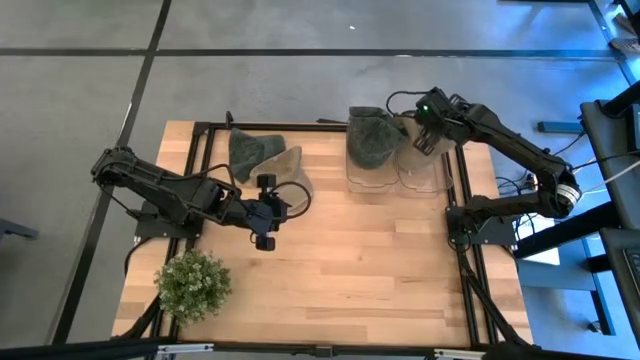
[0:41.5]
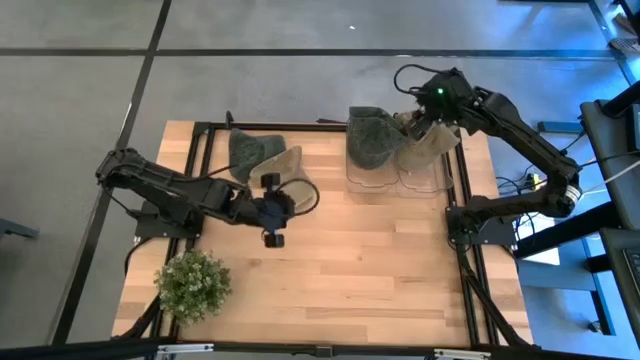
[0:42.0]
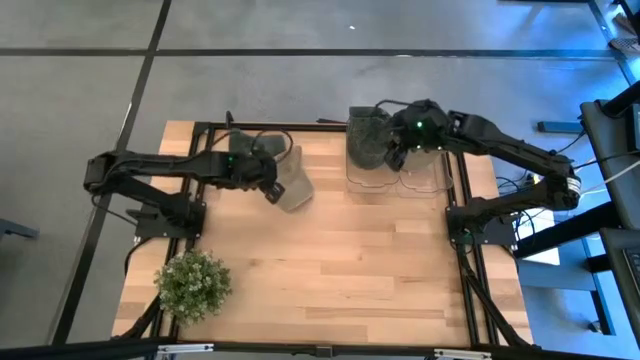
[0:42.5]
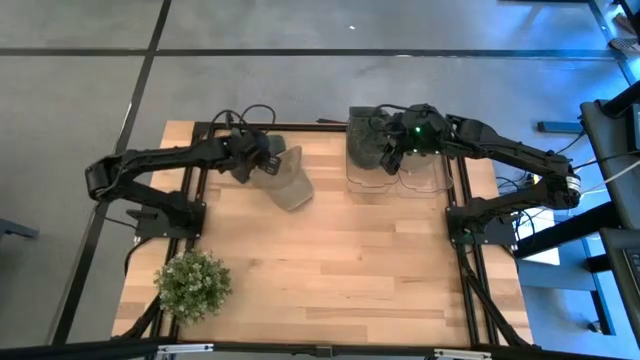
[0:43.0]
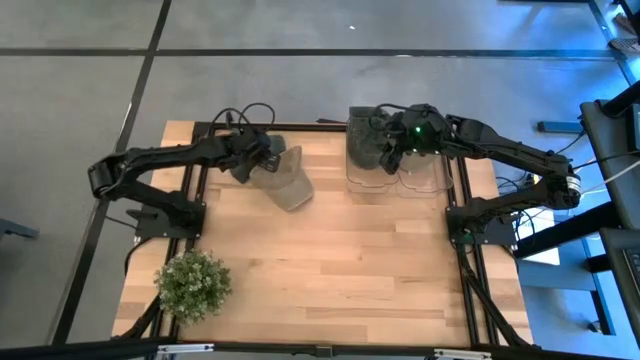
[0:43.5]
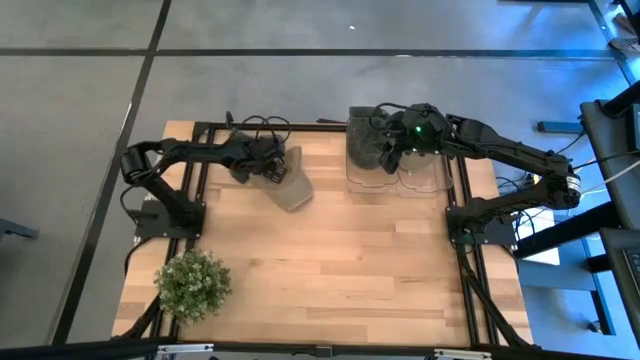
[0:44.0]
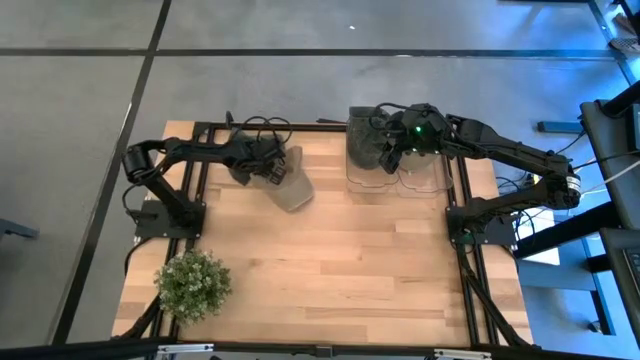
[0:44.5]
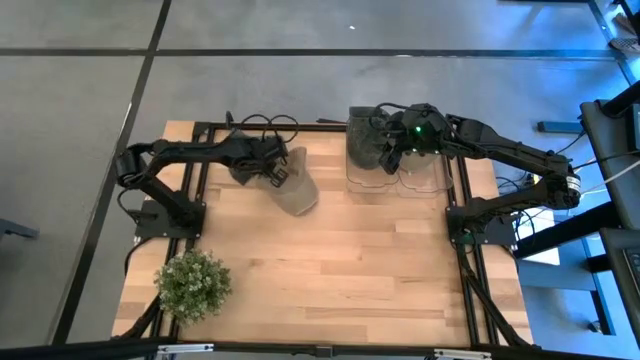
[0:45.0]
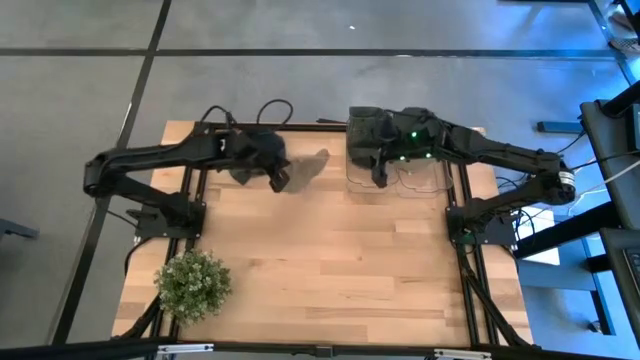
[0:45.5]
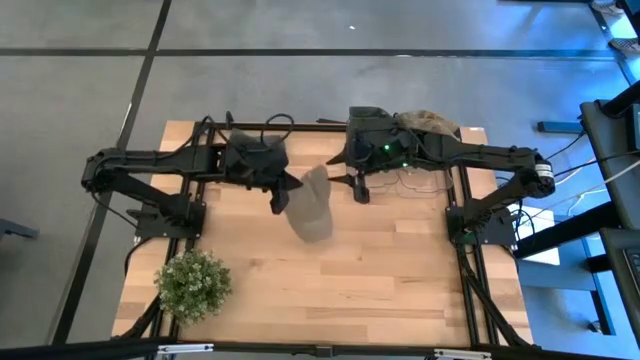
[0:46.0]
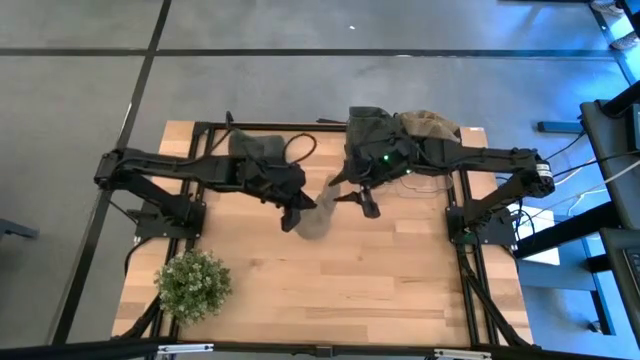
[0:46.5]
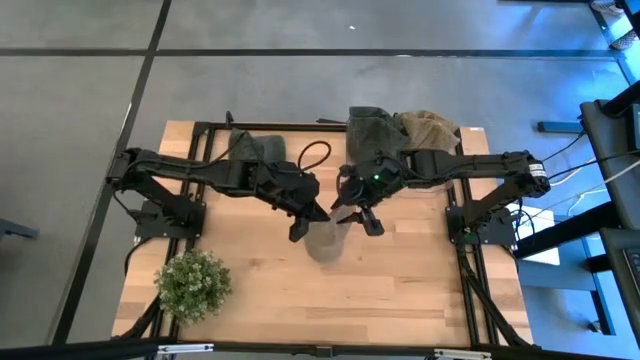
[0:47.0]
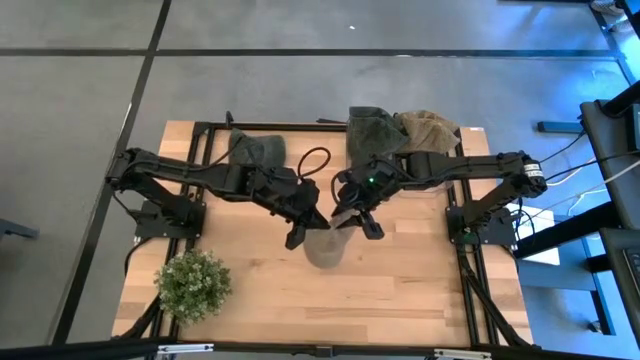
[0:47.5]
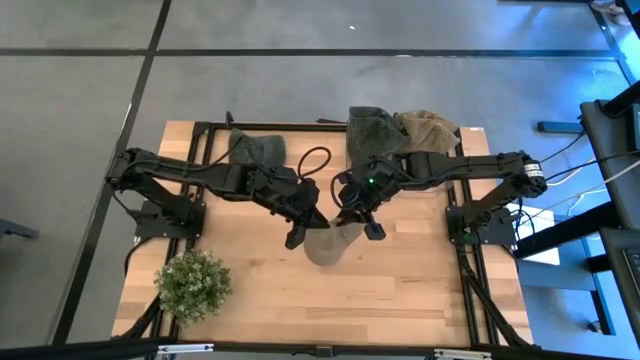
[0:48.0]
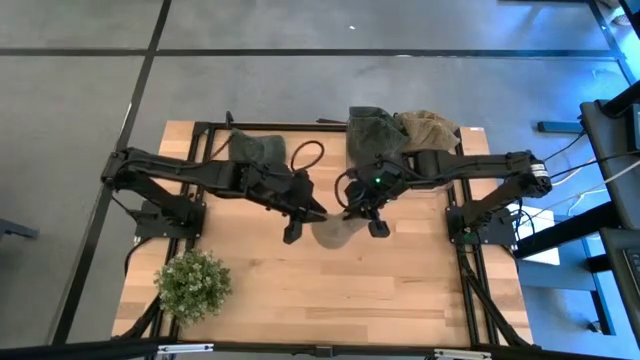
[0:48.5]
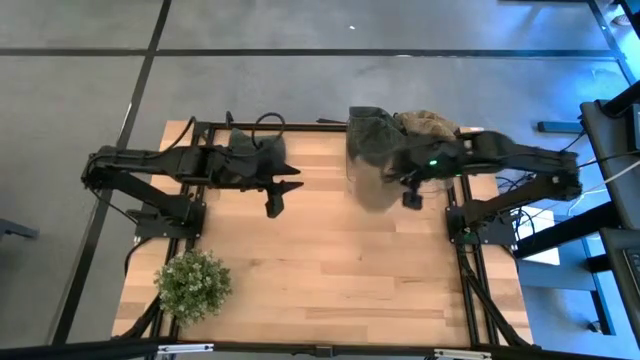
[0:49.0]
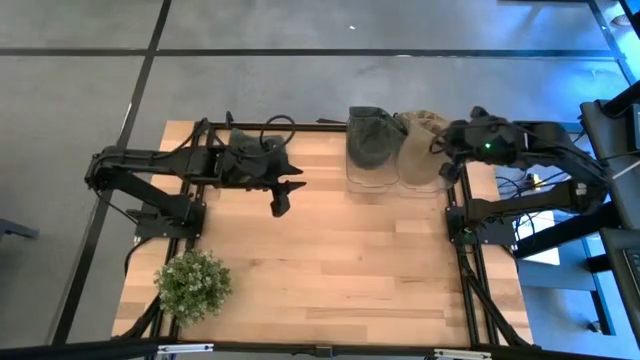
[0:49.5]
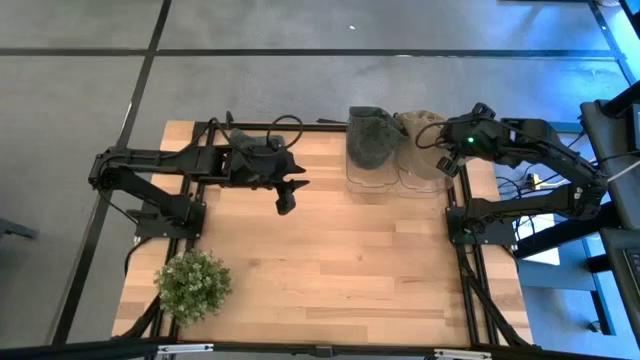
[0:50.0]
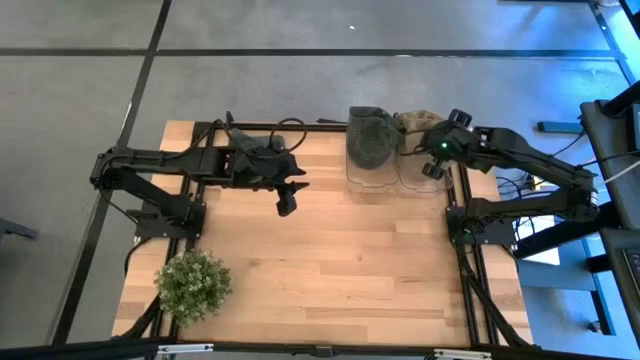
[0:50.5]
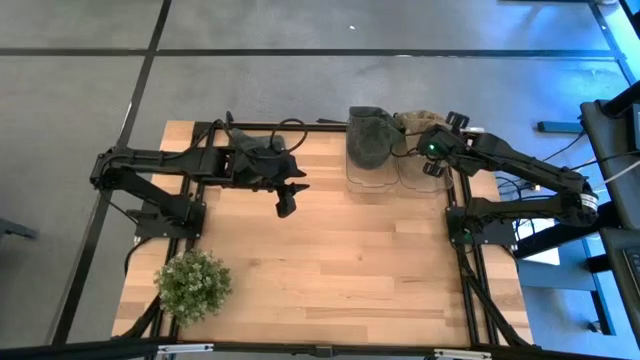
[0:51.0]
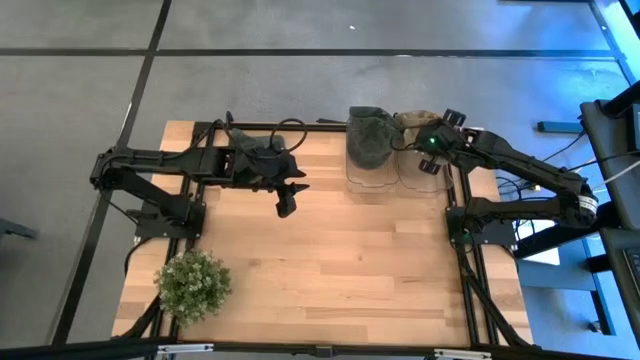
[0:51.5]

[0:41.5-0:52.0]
Task: Pick & Place hat
Put the brown cap into the right transparent bin

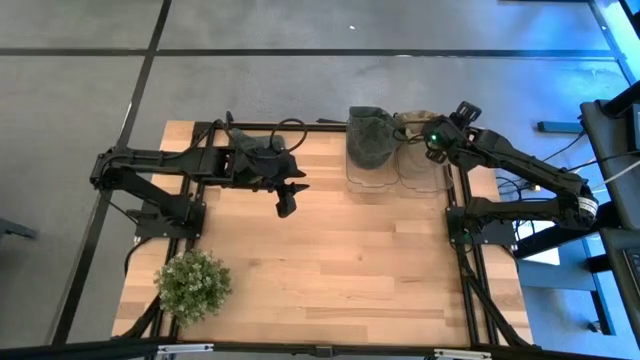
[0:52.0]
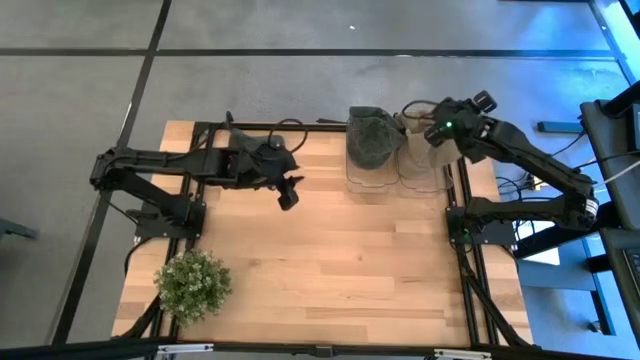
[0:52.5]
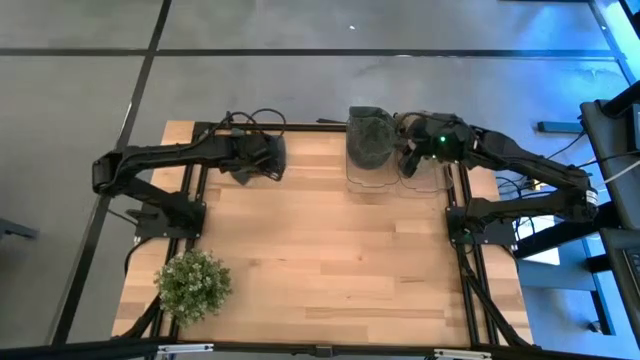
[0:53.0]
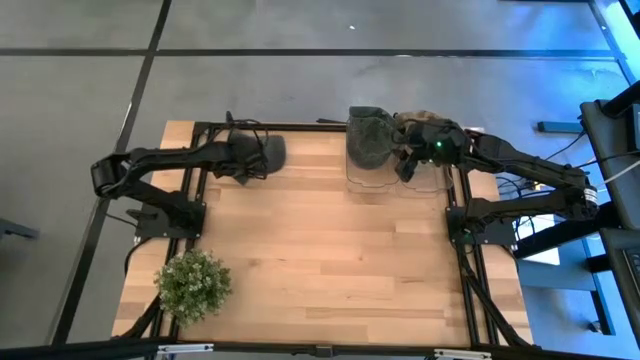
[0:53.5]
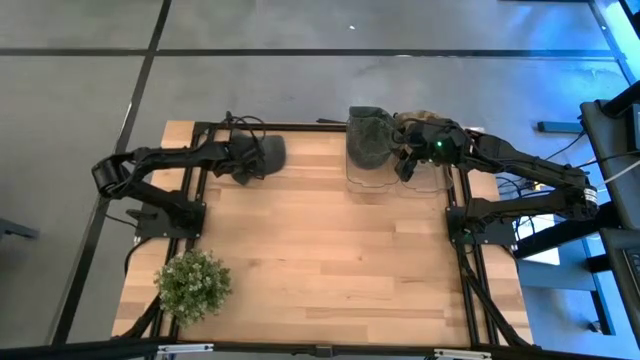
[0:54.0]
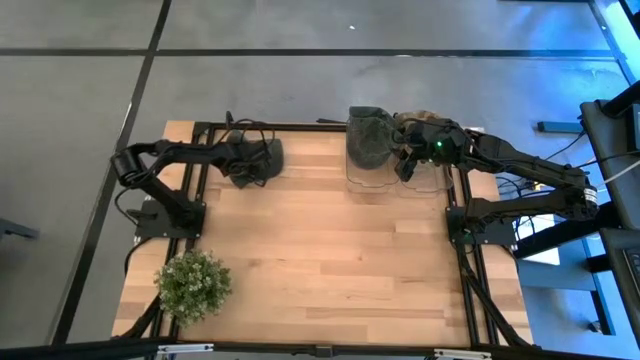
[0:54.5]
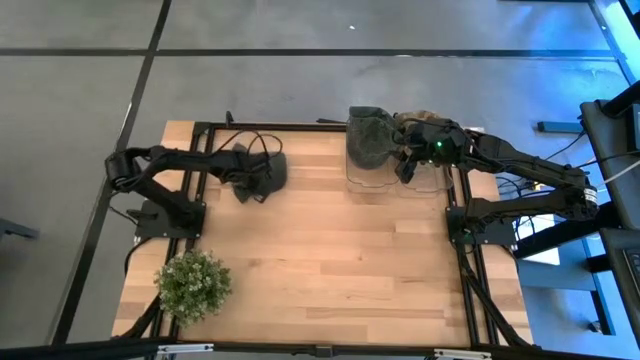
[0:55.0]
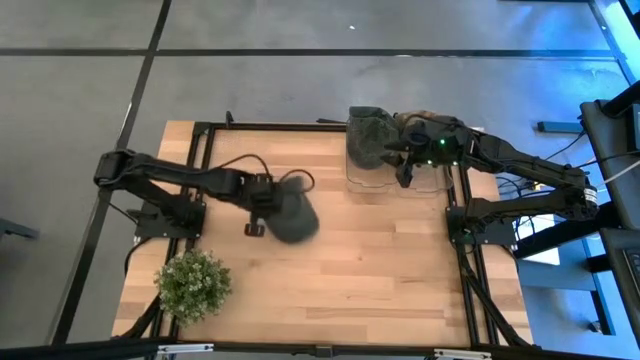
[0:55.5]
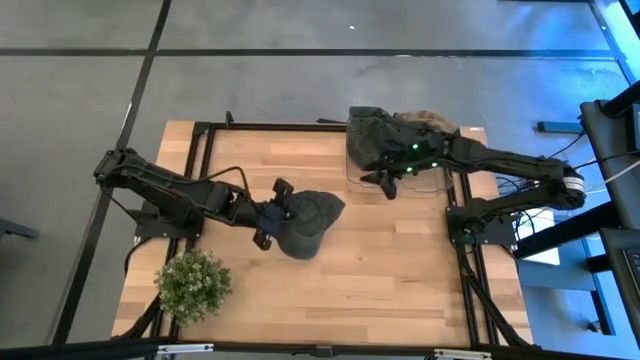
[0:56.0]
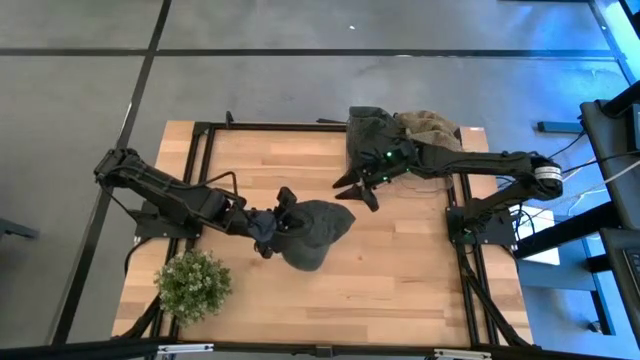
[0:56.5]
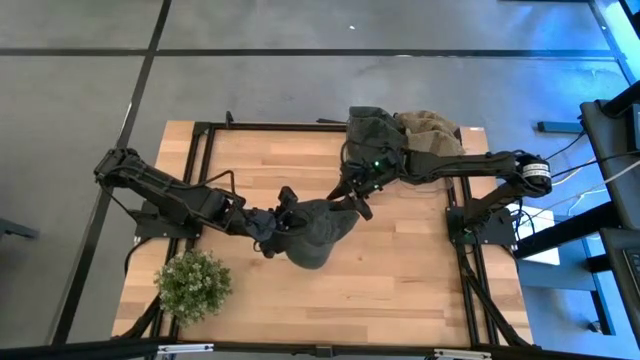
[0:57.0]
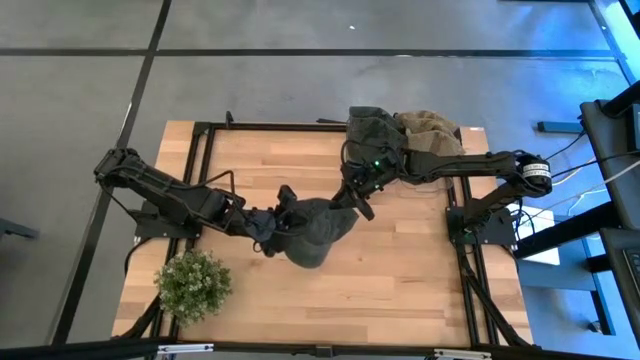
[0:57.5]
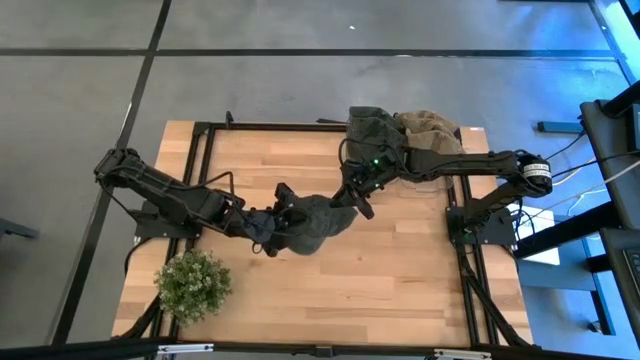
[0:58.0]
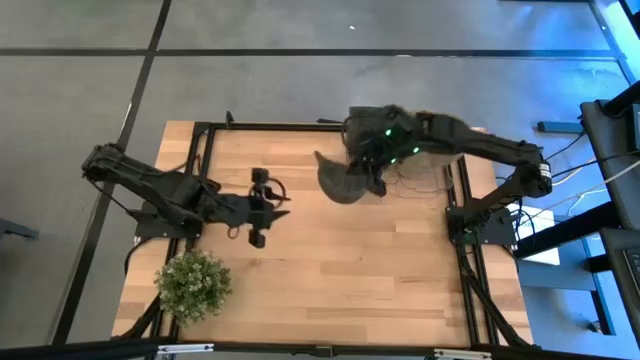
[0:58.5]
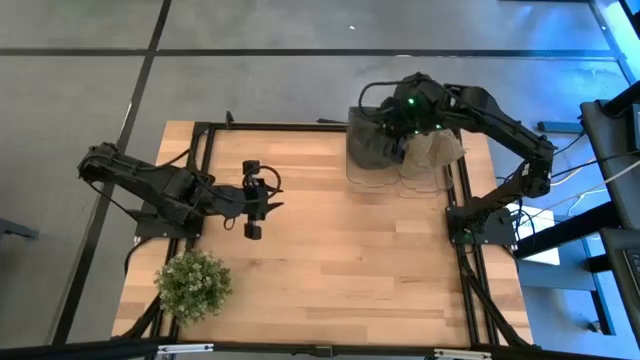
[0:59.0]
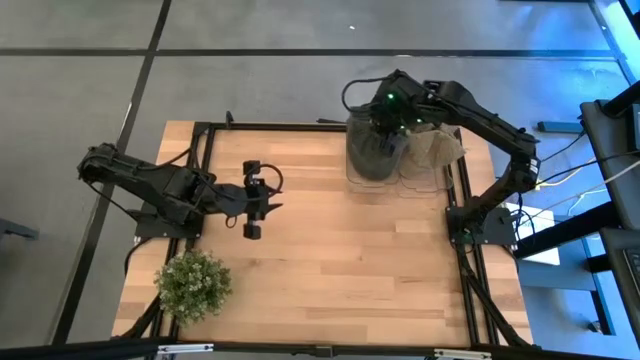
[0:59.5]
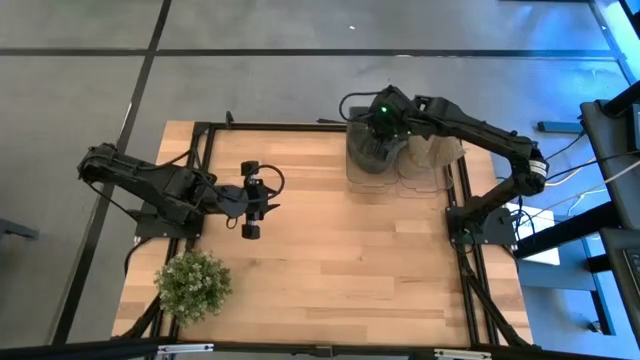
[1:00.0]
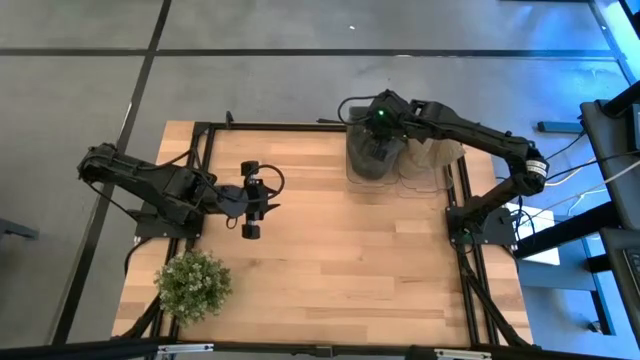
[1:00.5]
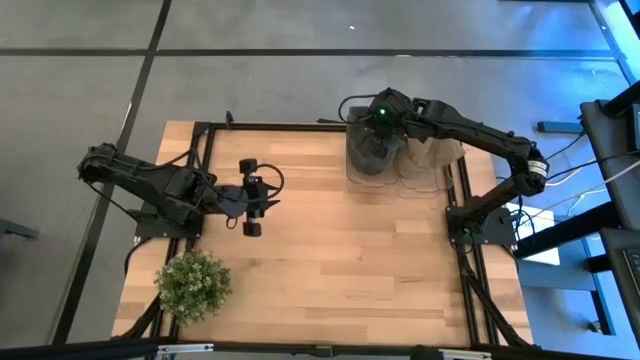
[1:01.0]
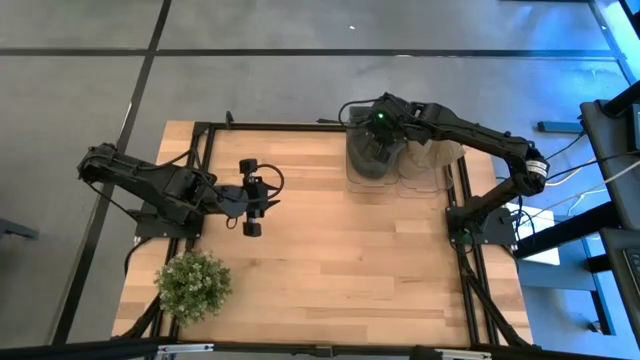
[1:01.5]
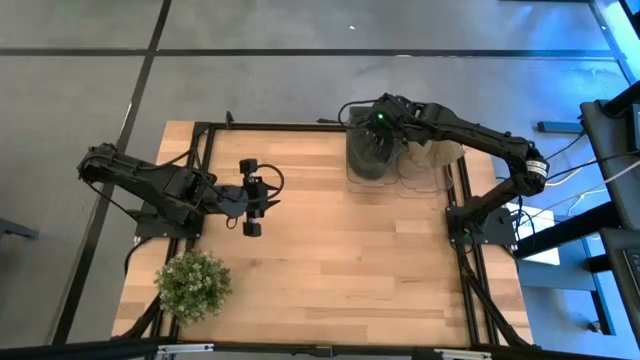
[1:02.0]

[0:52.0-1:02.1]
Put the black cap into the left transparent bin

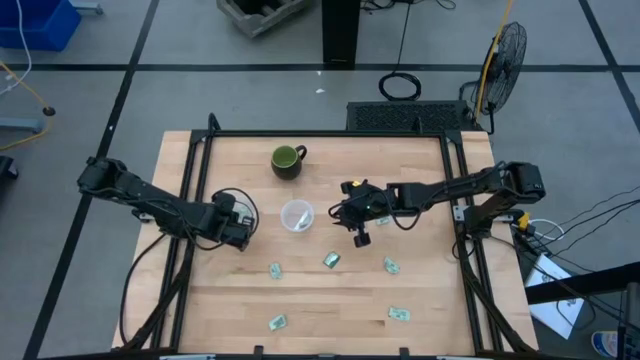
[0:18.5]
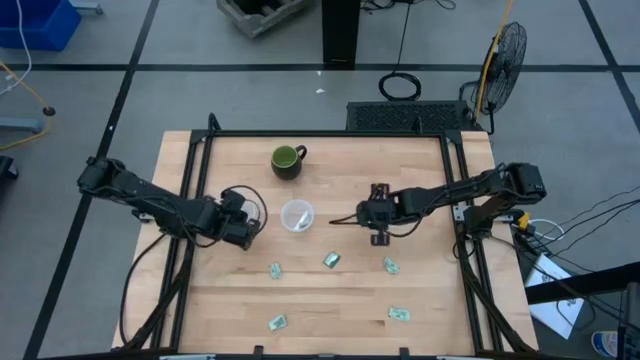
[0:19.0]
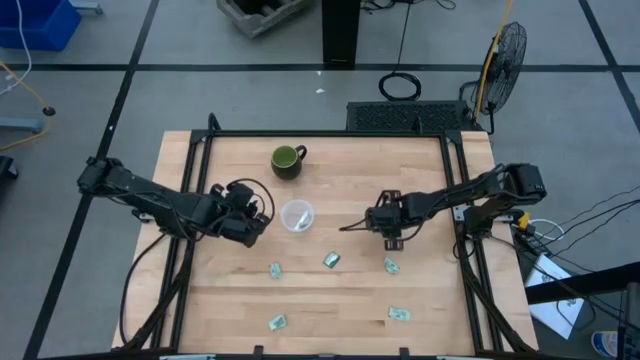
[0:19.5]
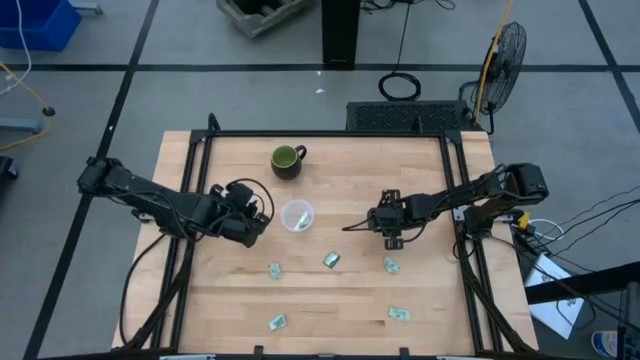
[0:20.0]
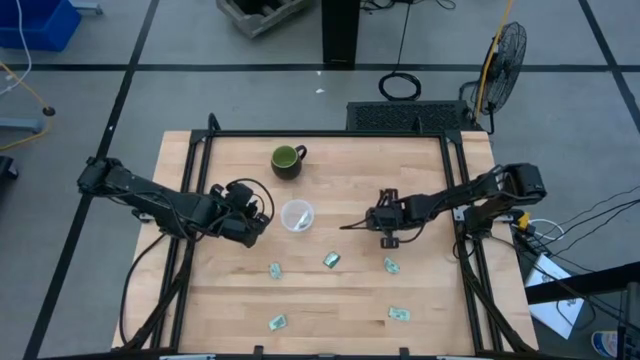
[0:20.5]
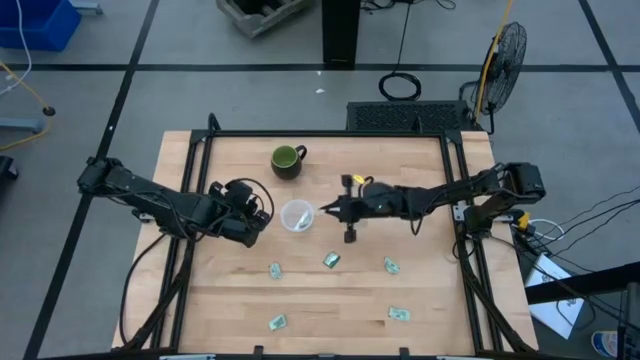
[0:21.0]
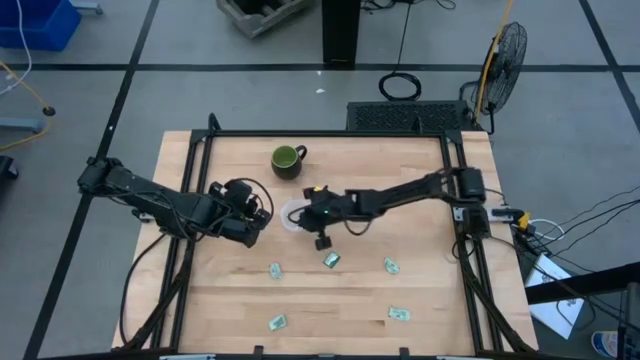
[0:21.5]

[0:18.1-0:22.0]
Task: Pick and place Stevia / Truvia into bins
Put the stevia pocket in the right plastic container
